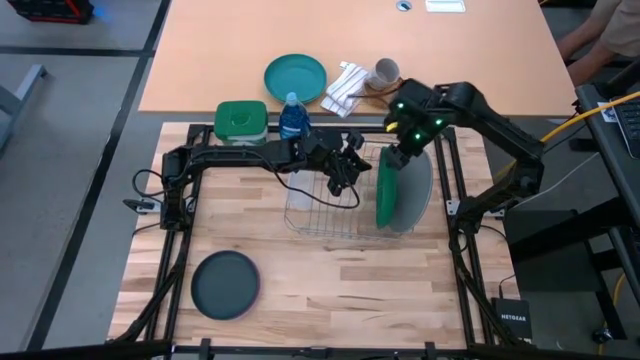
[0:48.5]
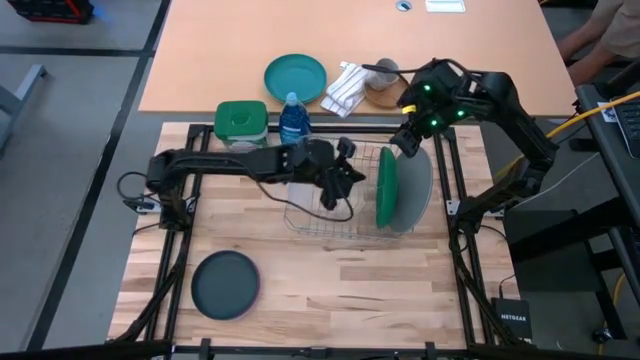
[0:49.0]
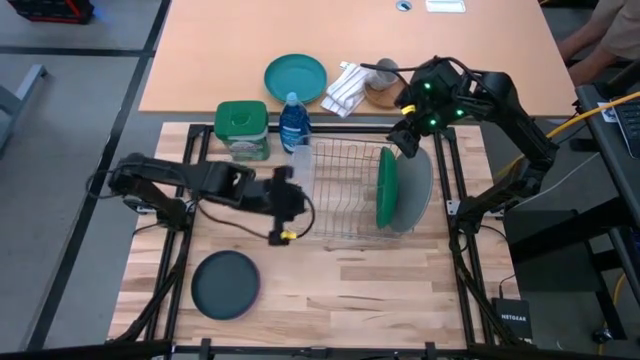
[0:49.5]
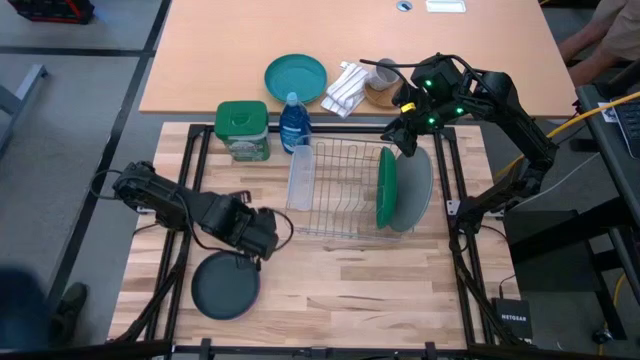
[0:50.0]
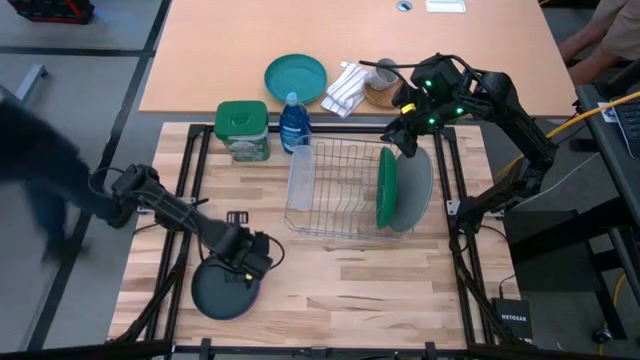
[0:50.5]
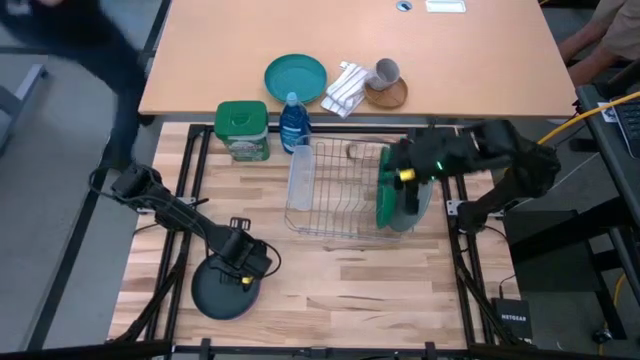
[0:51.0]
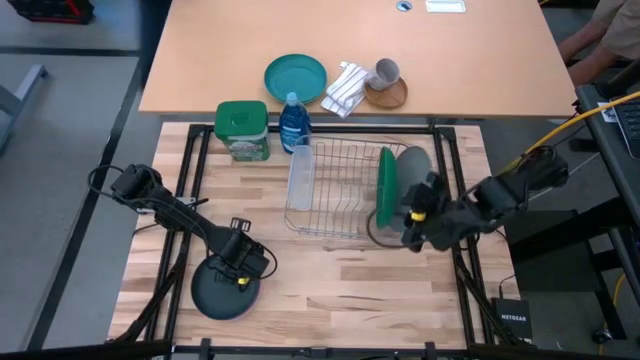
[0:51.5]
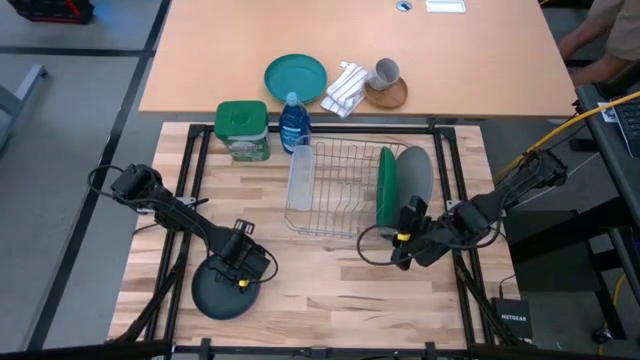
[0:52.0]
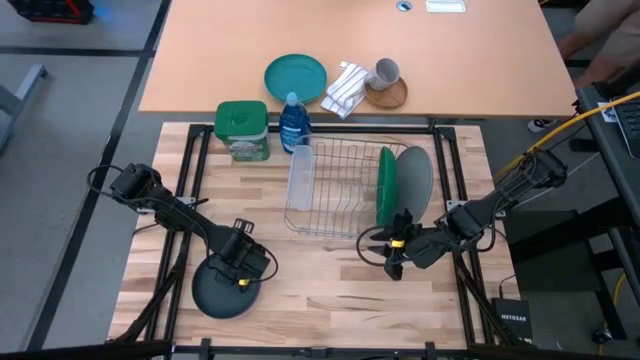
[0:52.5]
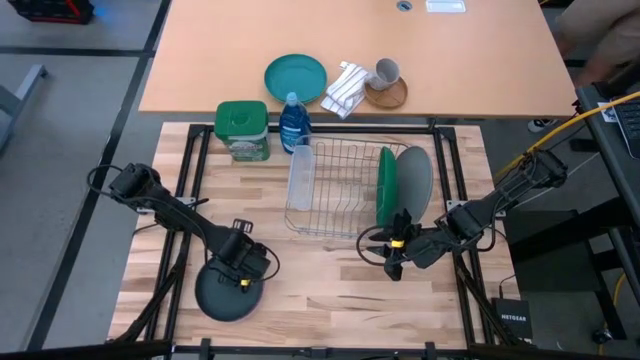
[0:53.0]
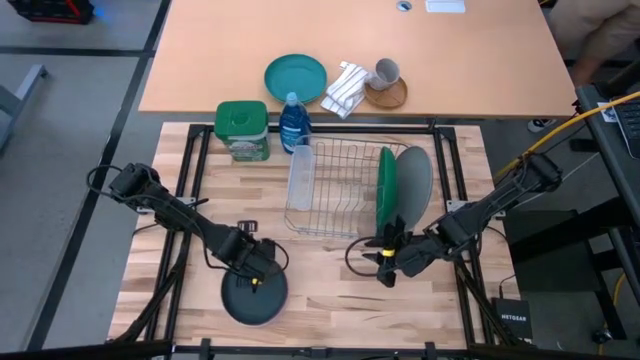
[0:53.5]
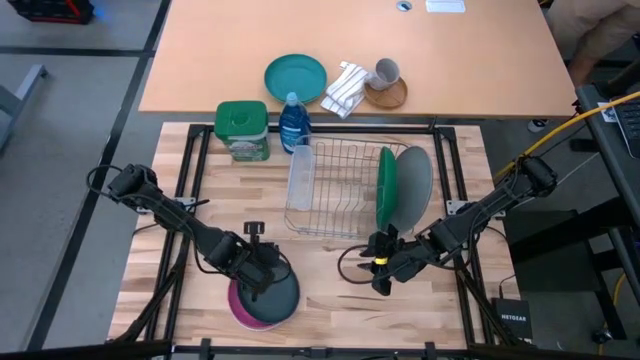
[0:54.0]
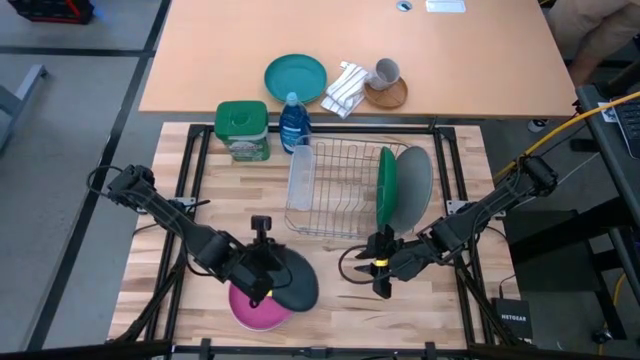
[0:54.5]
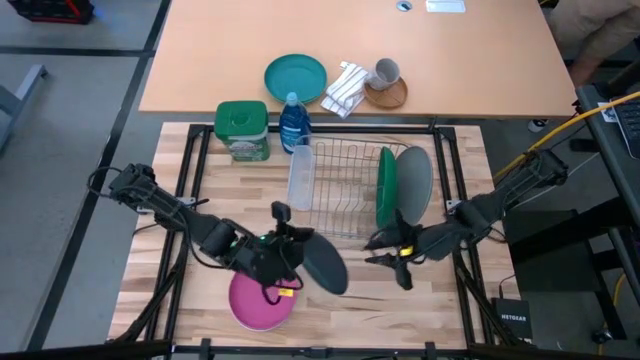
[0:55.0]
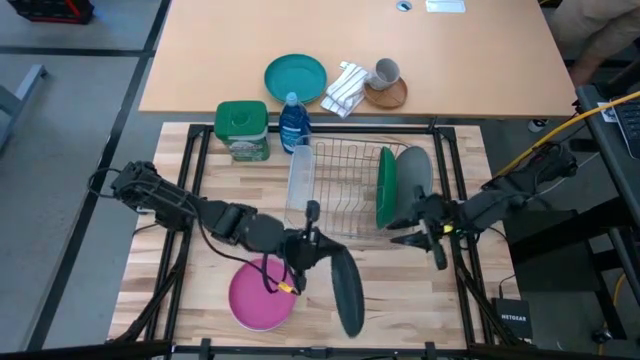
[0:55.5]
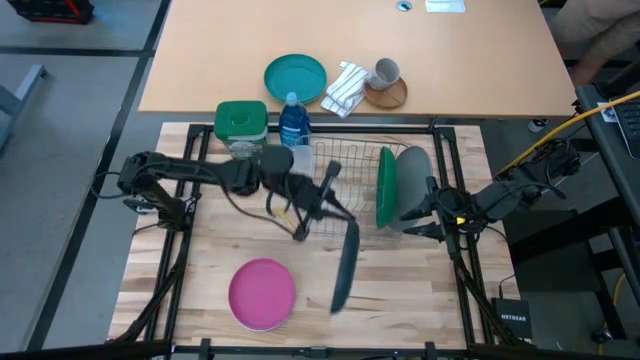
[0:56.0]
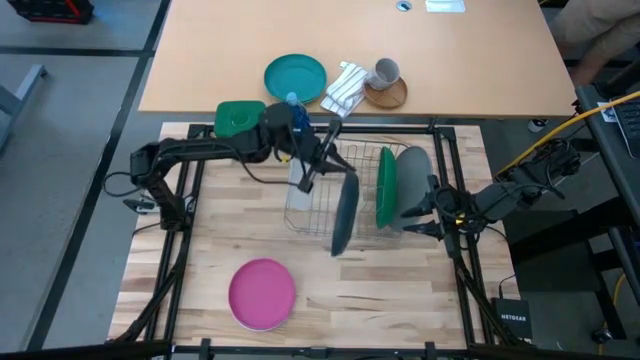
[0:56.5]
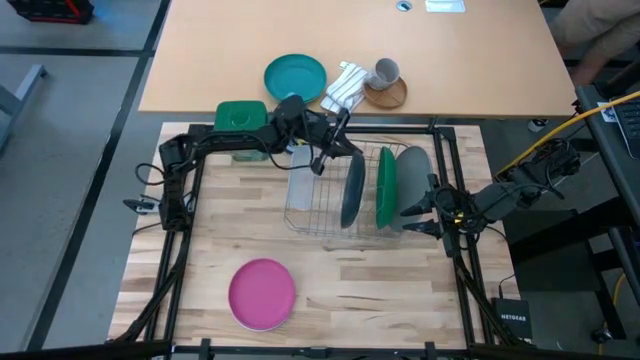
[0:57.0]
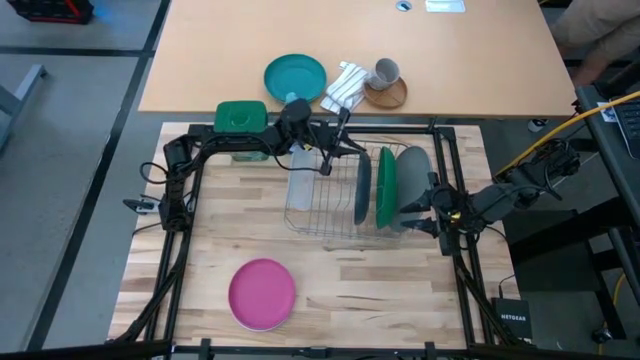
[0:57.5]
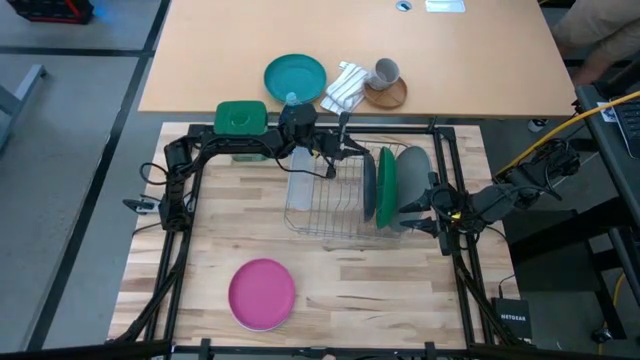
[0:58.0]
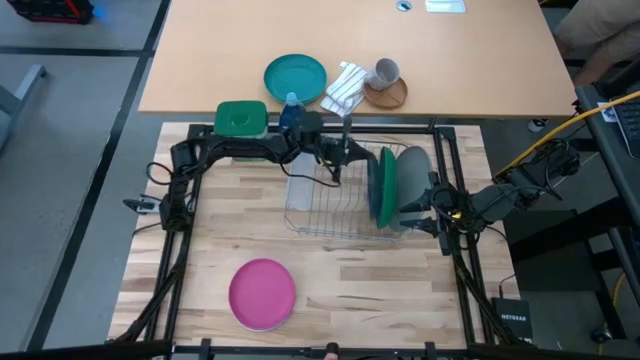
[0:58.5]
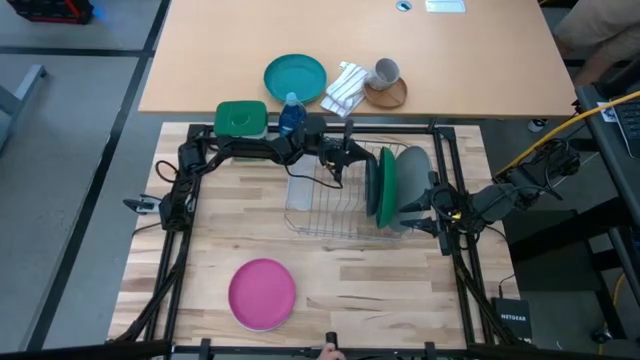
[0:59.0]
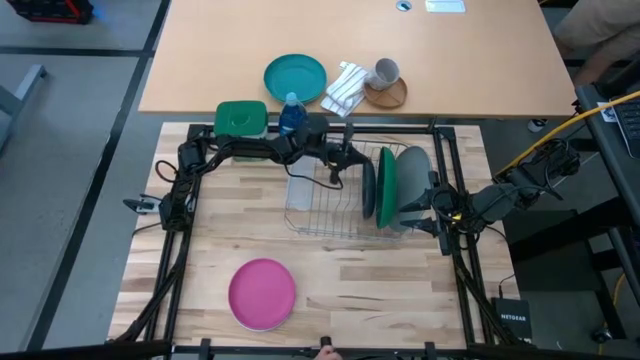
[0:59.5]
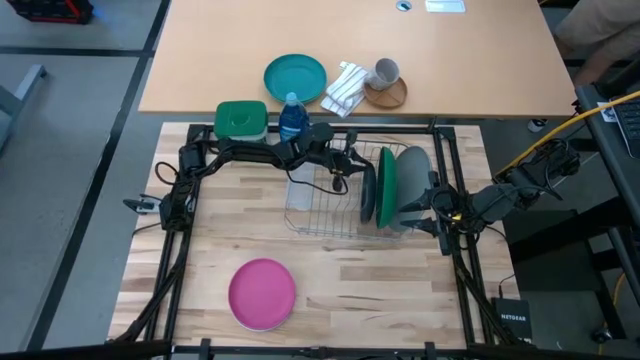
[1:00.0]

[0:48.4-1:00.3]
Task: Sort dishes
Put the dark blue plate into the dish rack

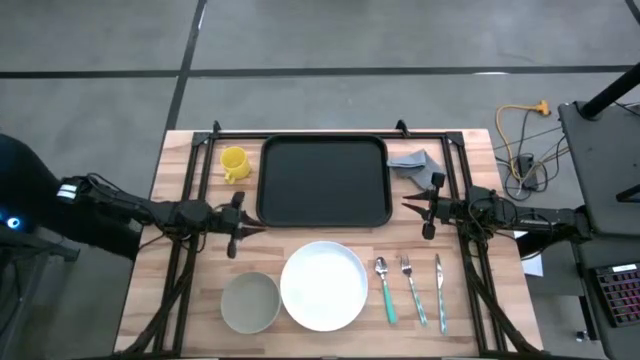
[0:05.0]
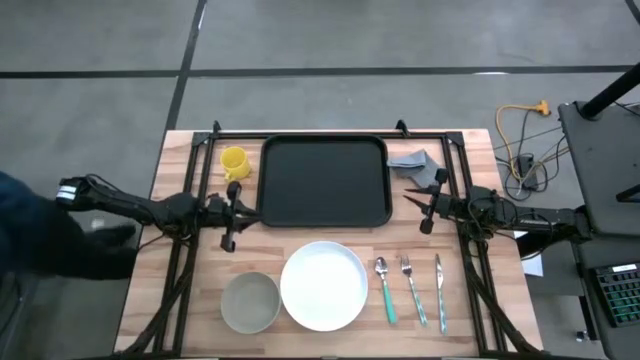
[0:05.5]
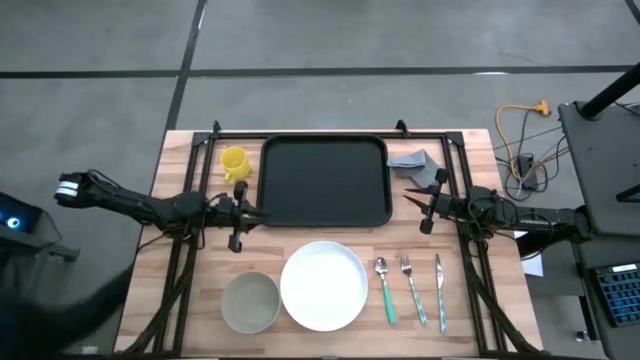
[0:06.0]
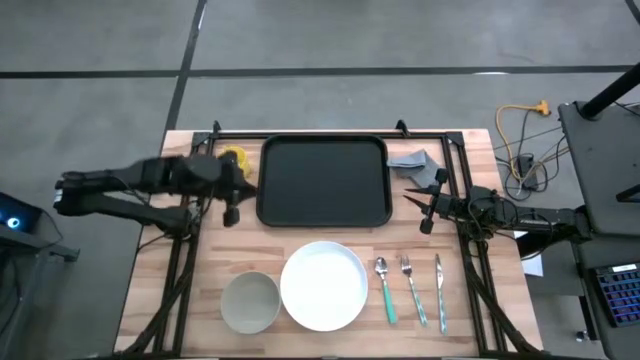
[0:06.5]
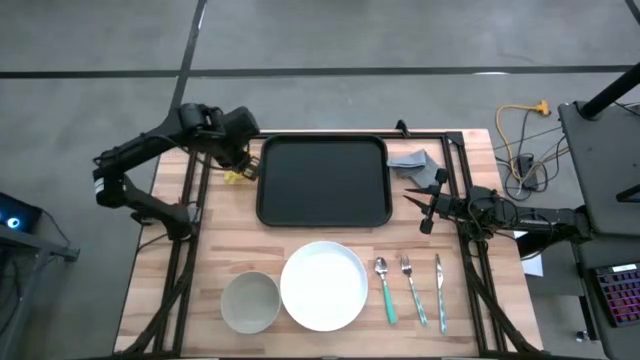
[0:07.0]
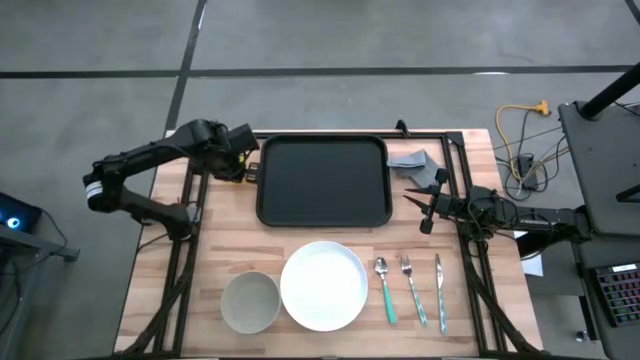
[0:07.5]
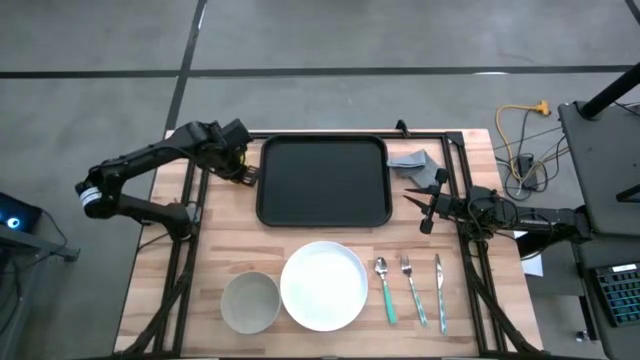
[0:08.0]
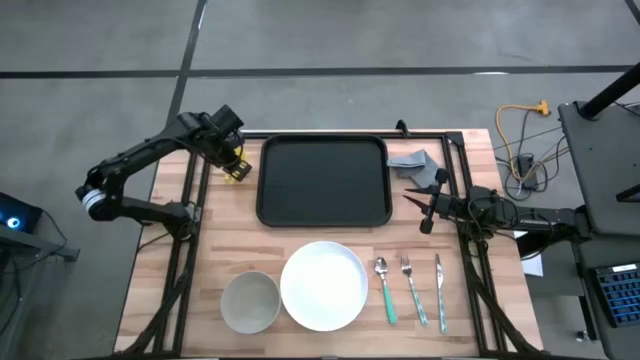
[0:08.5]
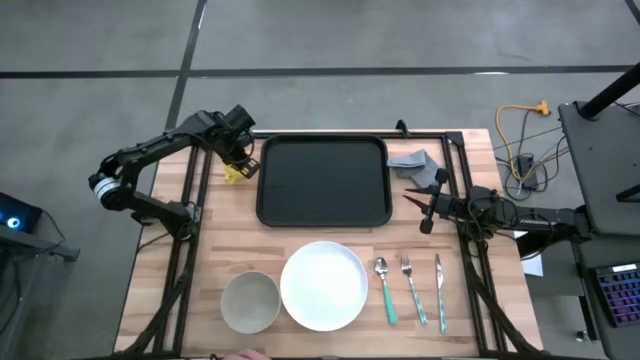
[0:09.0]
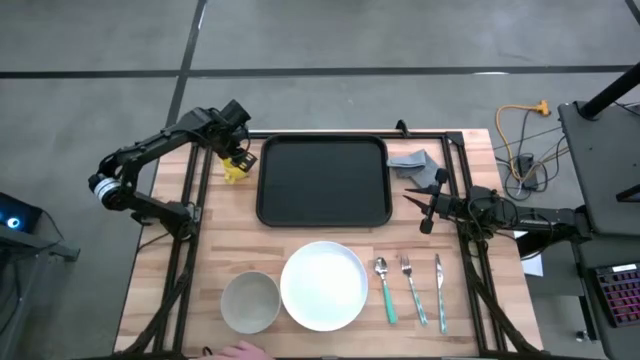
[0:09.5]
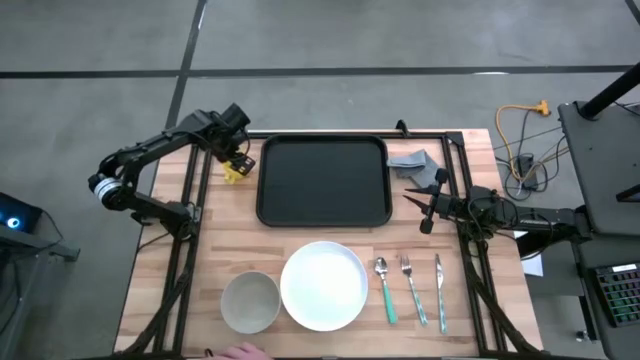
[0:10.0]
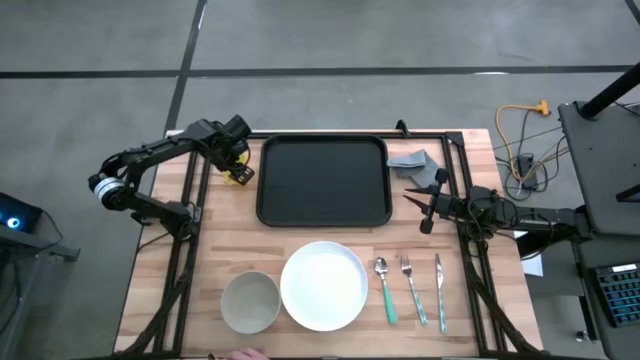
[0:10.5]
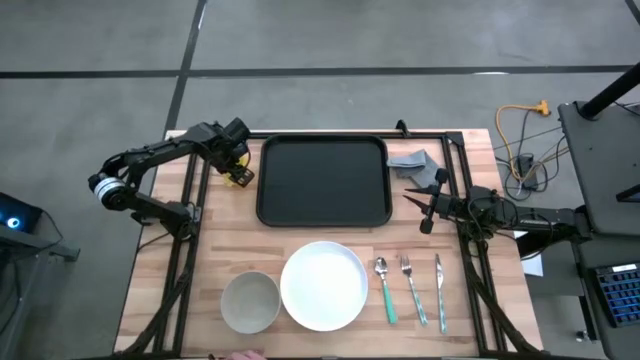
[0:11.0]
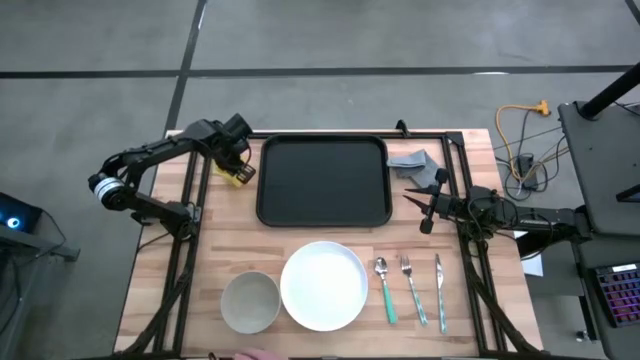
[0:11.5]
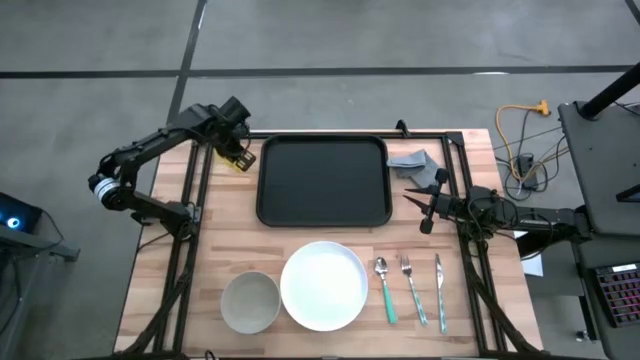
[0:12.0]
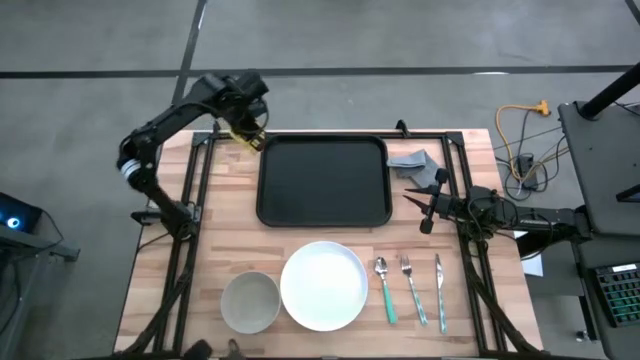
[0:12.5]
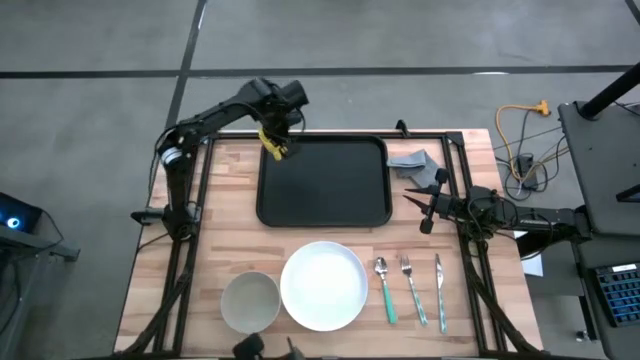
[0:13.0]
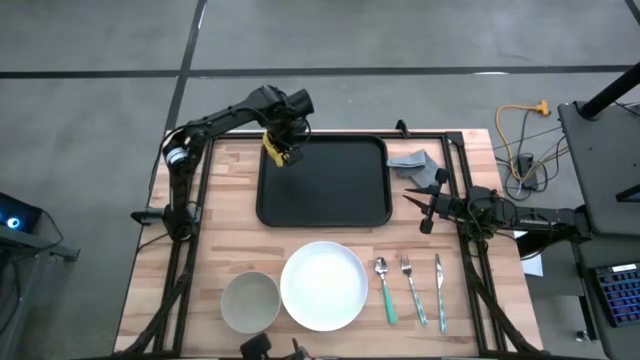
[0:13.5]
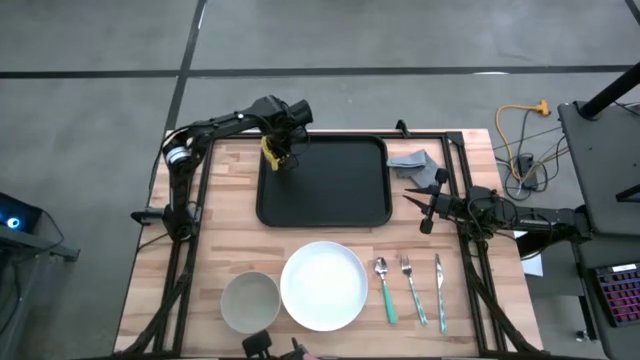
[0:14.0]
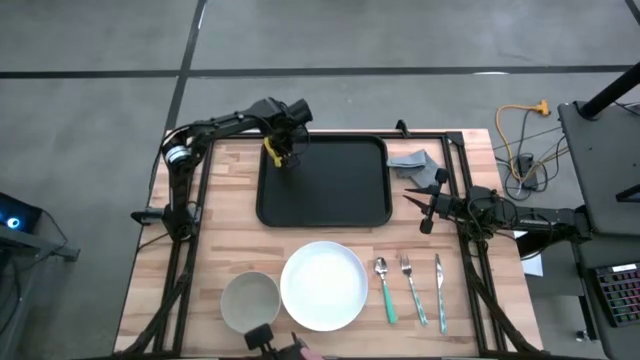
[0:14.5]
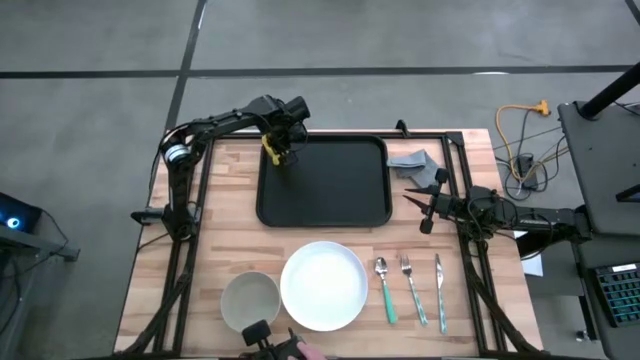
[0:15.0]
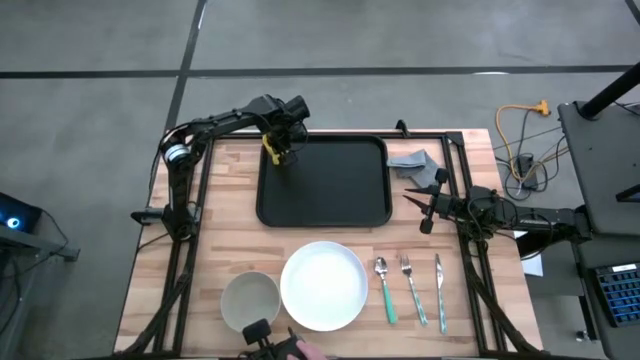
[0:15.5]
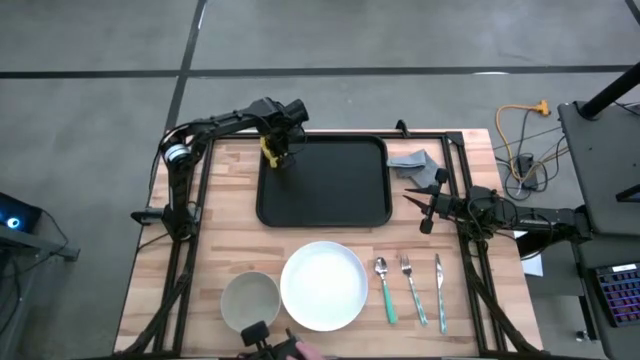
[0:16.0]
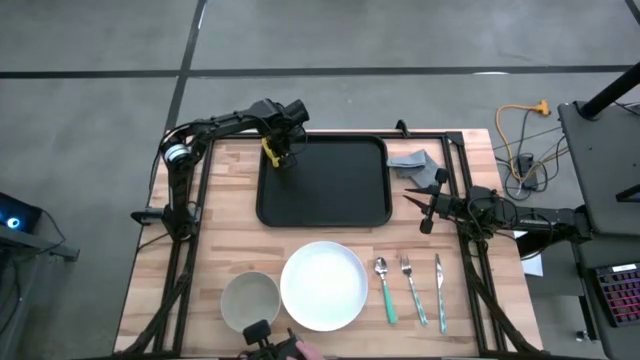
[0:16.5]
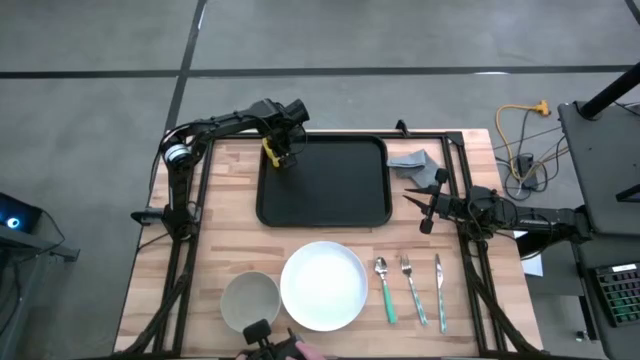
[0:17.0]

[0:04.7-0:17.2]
Task: Set up tray
Put the yellow mug on the black serving tray
